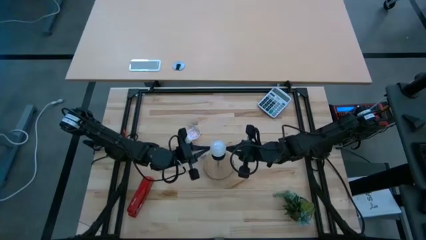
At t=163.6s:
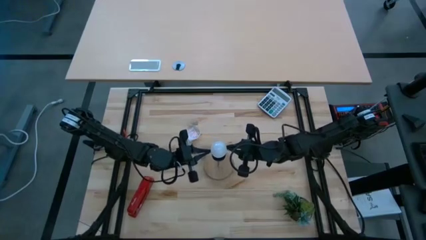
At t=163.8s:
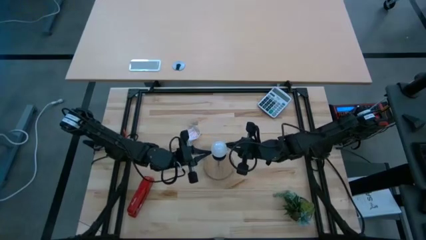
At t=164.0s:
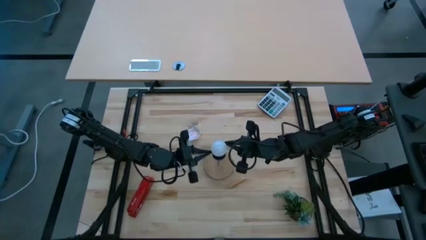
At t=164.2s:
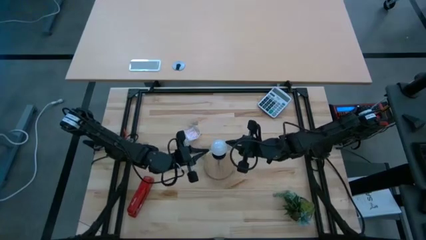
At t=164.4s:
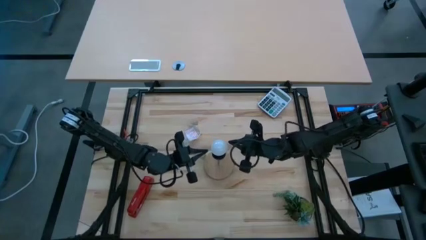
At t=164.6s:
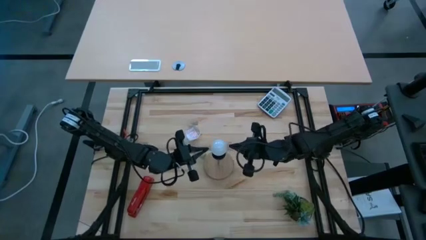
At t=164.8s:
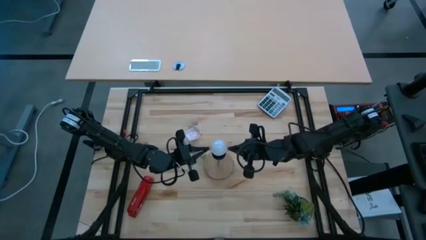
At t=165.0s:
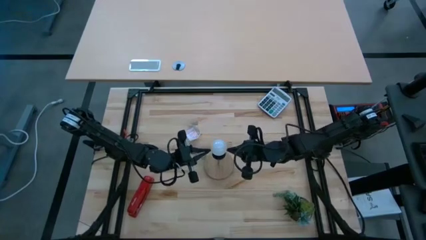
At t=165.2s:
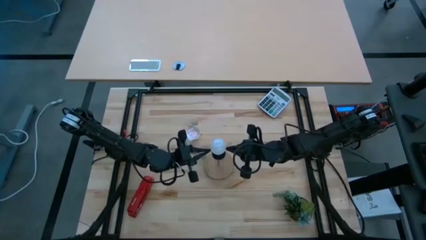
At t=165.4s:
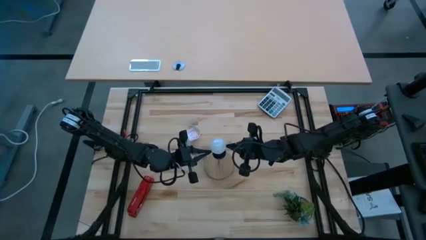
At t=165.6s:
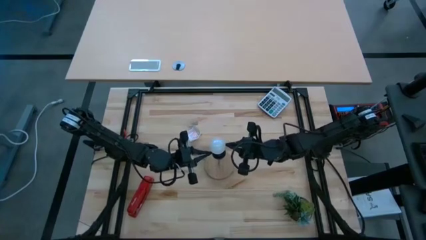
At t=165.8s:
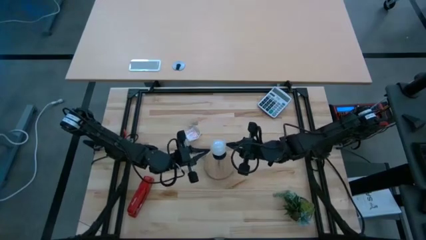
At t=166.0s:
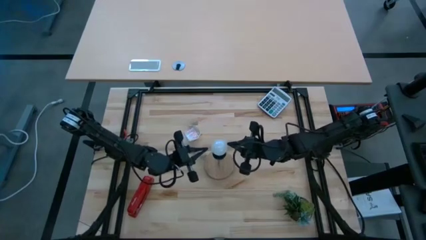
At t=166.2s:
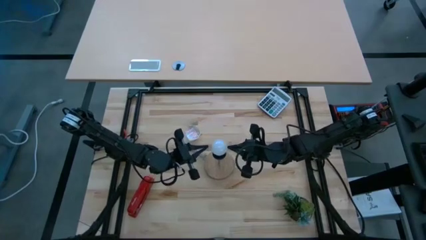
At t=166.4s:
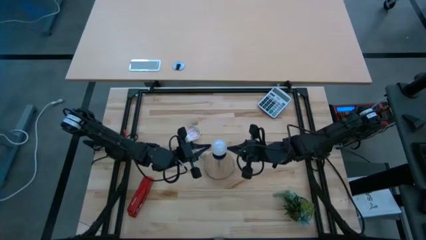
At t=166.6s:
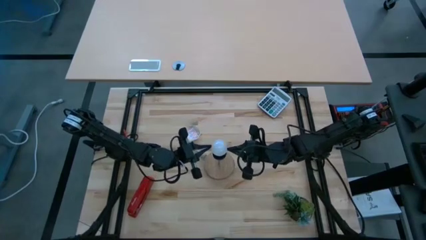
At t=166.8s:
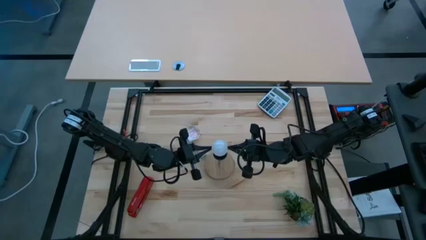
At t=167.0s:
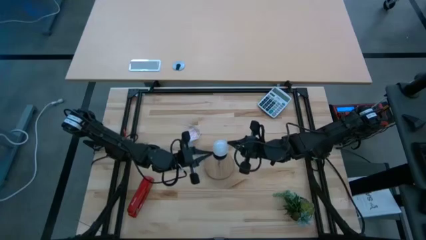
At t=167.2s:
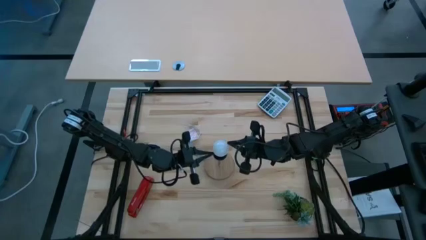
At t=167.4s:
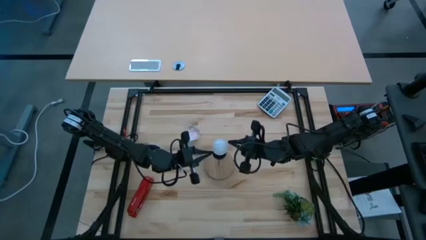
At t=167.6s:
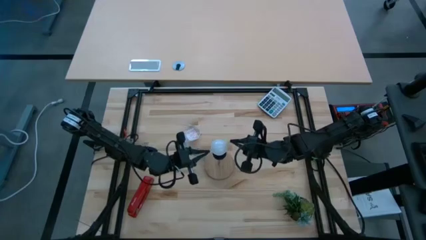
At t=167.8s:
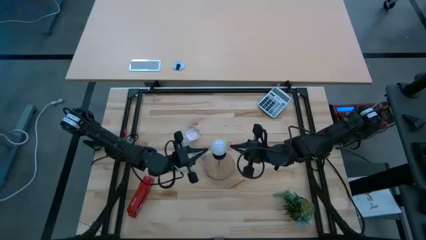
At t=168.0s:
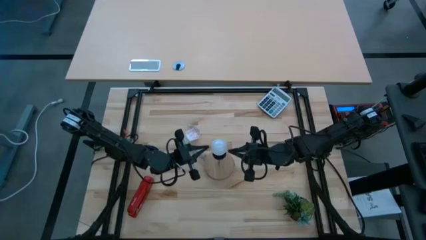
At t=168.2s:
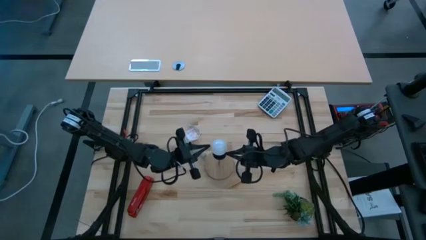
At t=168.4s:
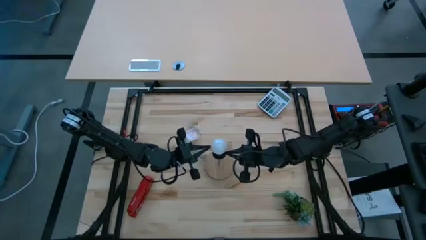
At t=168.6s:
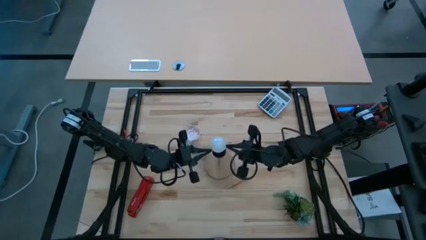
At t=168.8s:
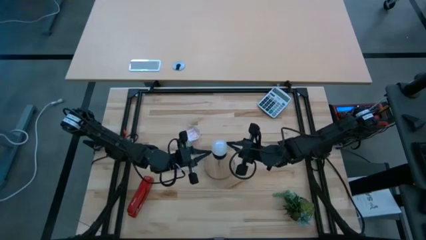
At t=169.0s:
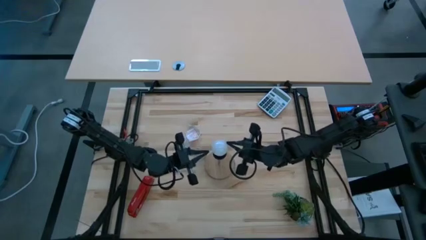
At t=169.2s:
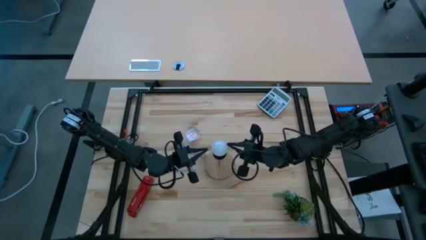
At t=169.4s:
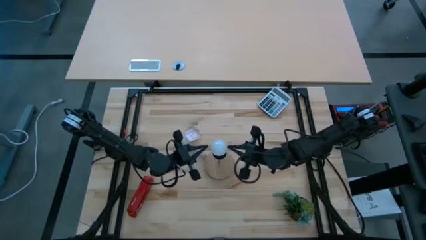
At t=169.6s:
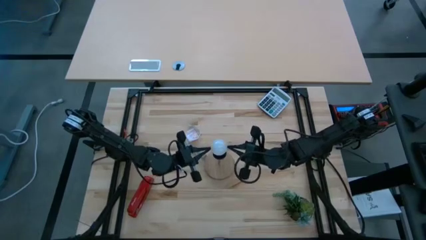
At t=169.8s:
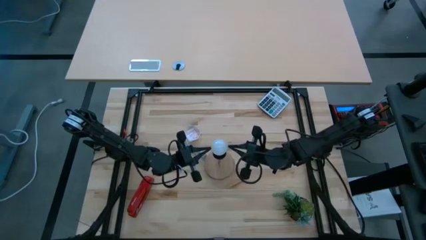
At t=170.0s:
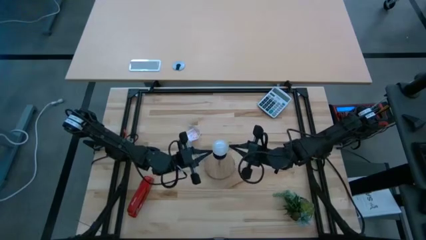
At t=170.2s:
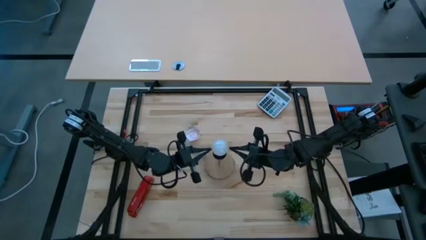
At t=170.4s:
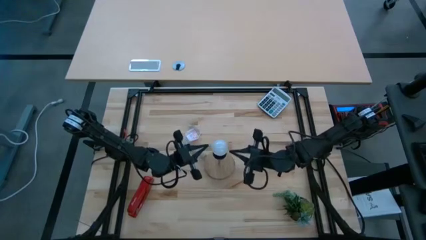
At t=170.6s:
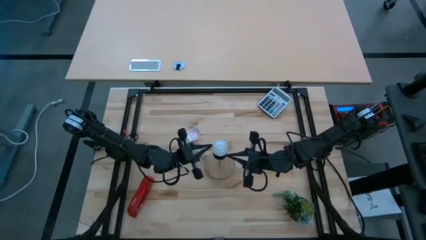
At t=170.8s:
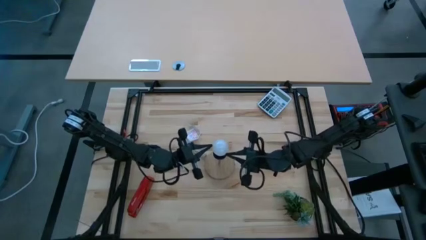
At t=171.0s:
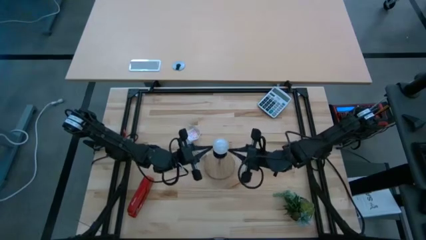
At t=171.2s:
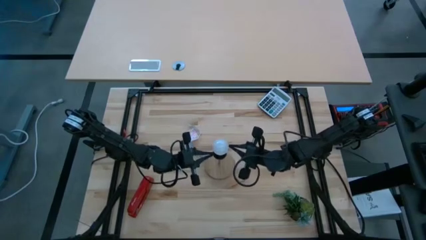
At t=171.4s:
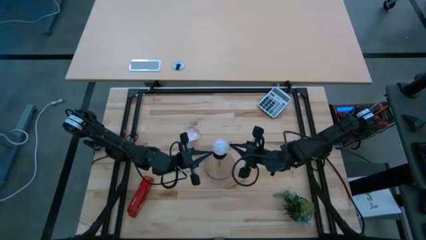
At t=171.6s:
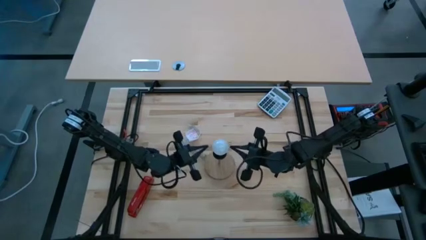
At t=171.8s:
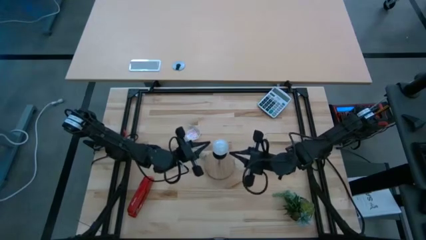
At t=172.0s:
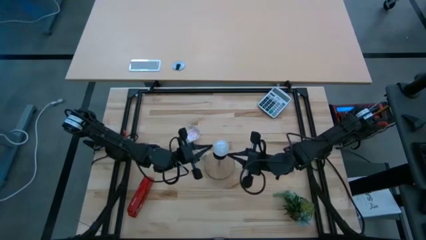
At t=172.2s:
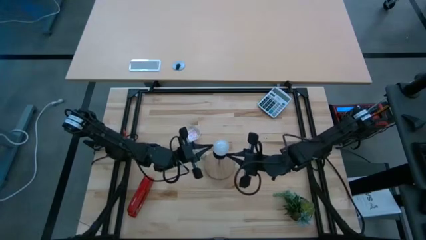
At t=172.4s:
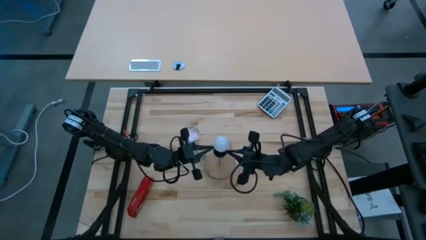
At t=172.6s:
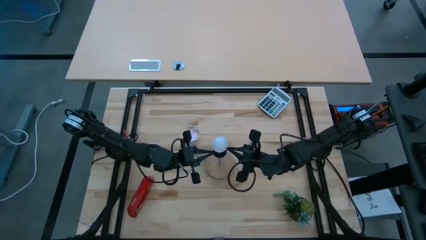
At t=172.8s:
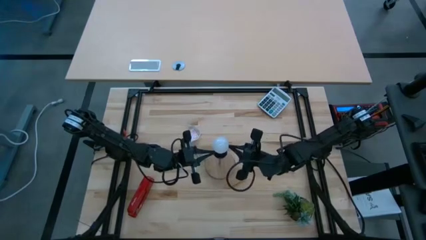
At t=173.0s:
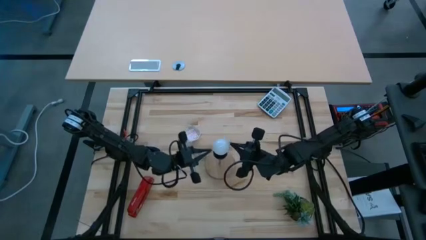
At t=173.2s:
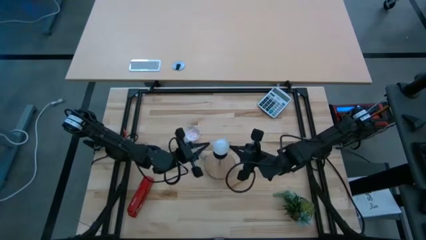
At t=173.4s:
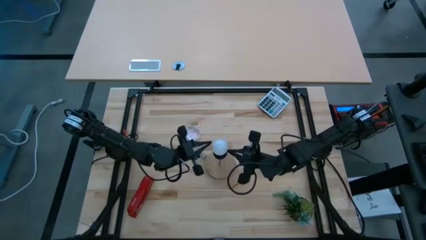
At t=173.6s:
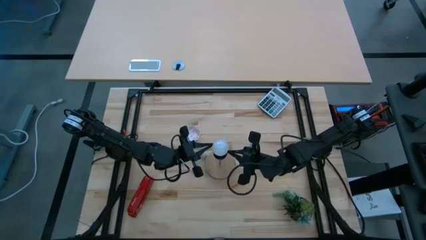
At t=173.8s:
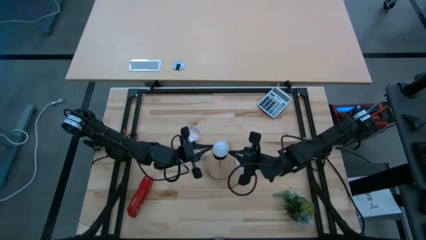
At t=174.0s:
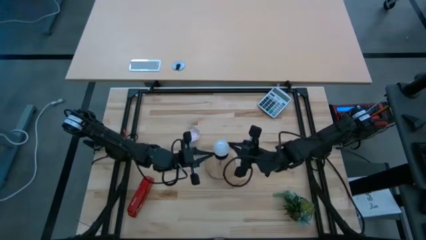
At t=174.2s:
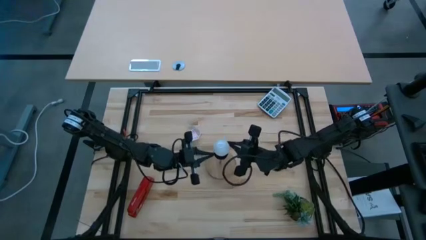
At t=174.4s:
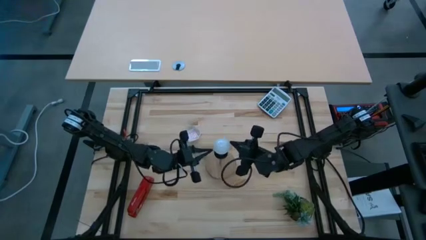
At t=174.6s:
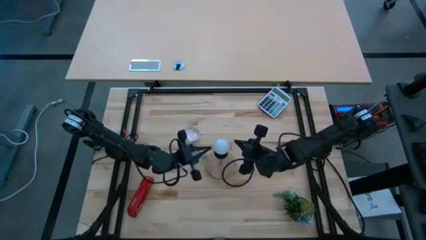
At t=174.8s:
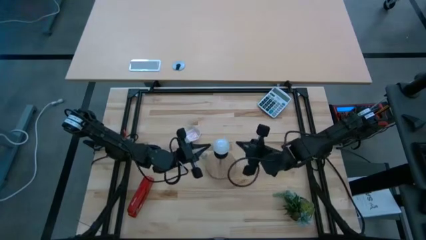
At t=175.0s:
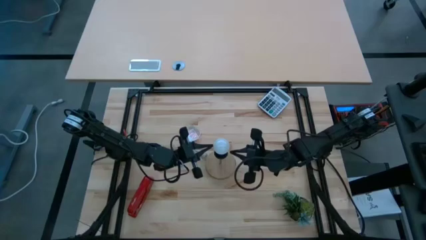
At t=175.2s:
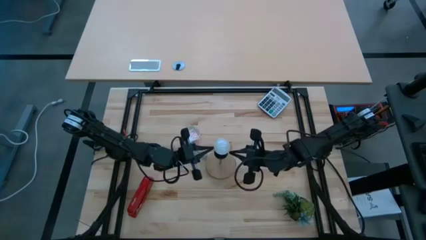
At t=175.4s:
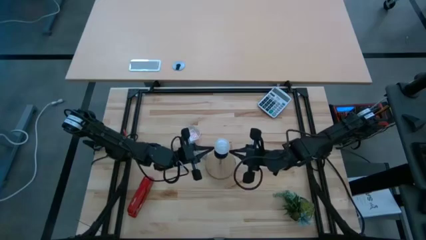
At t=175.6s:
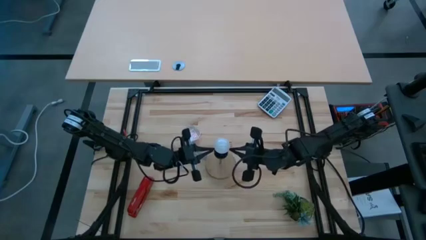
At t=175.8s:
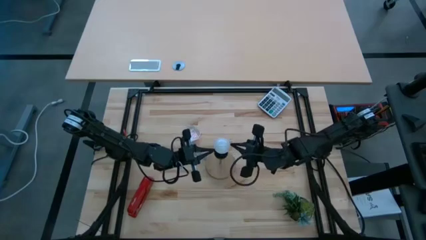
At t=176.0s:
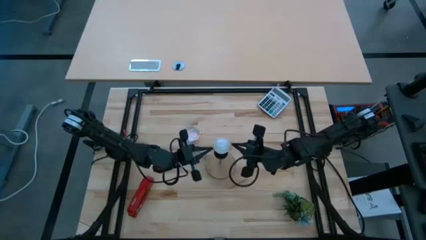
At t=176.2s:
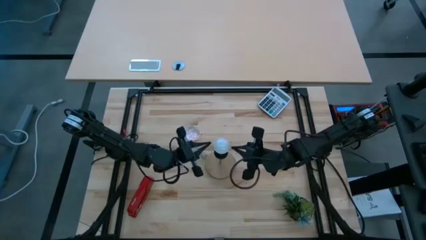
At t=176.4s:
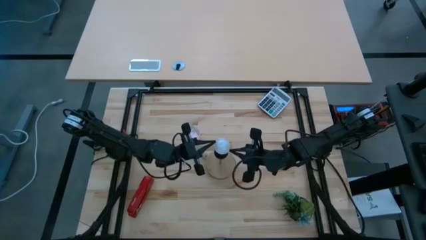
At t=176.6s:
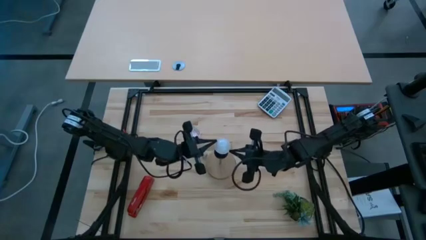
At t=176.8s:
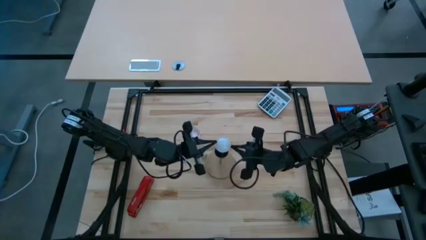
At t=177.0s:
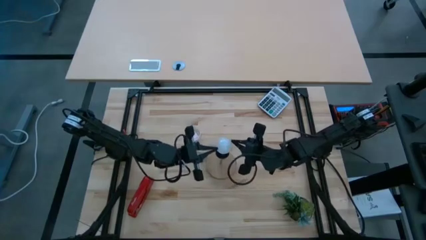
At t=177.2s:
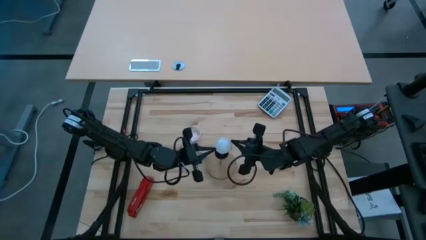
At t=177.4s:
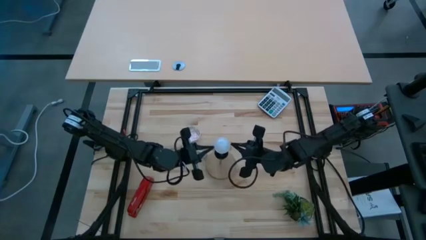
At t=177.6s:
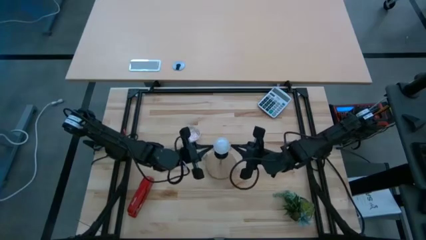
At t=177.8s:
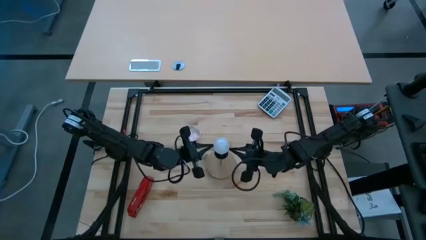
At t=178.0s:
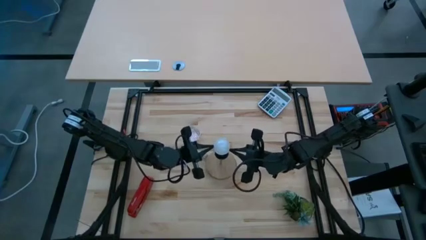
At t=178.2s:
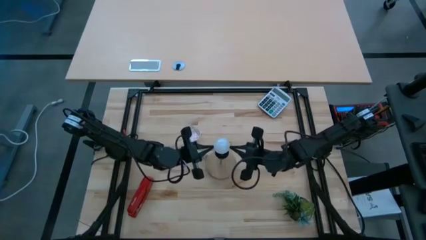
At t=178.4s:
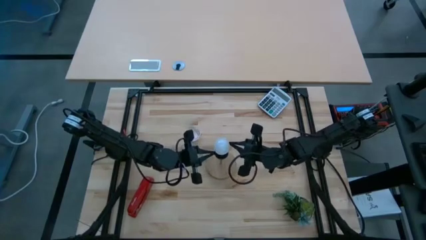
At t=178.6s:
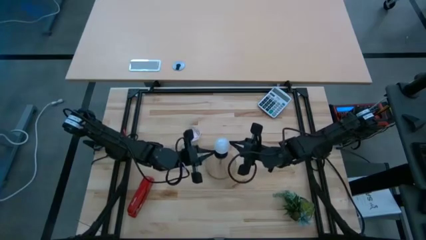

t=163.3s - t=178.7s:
Task: Screw lightbulb
Remove the lightbulb from the brown lamp
